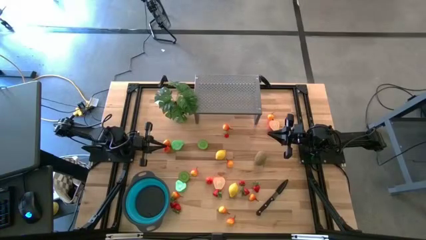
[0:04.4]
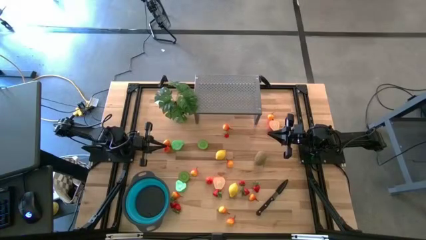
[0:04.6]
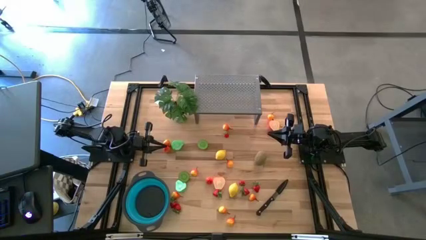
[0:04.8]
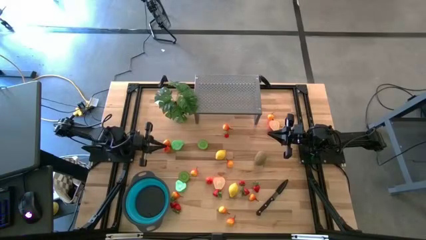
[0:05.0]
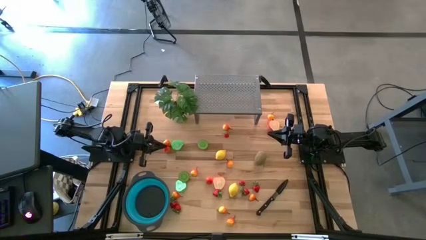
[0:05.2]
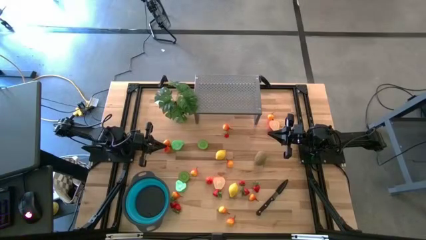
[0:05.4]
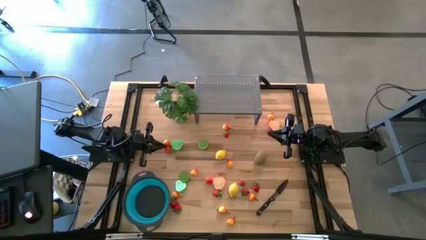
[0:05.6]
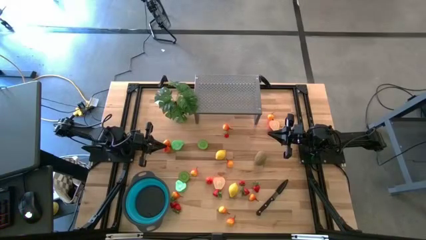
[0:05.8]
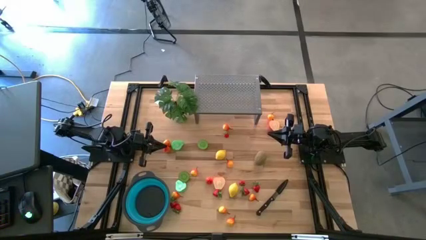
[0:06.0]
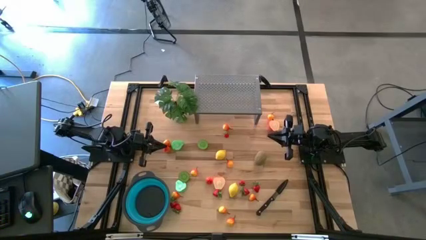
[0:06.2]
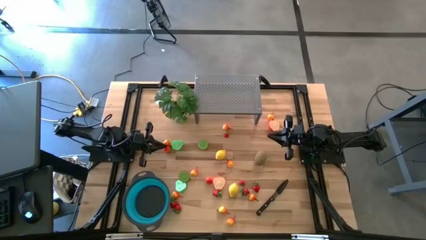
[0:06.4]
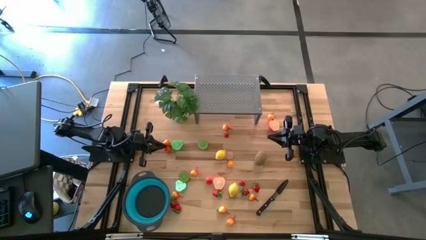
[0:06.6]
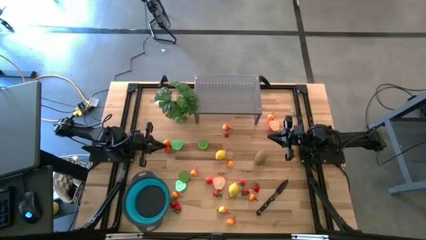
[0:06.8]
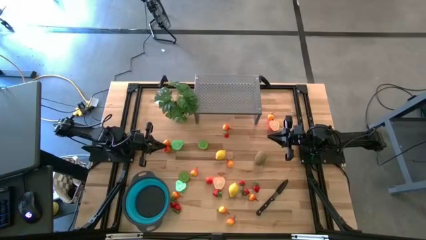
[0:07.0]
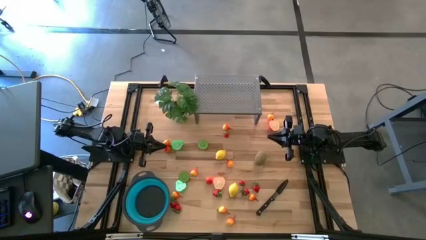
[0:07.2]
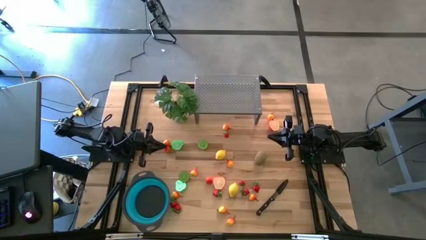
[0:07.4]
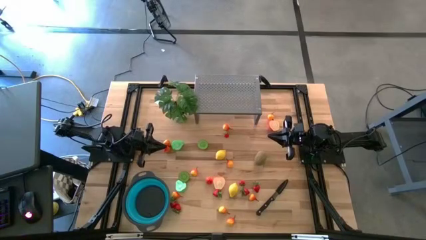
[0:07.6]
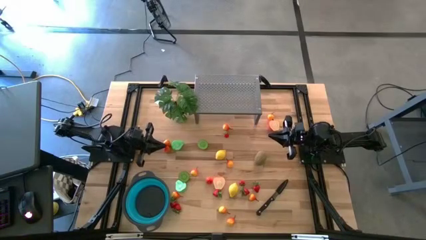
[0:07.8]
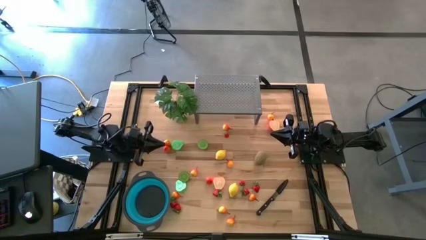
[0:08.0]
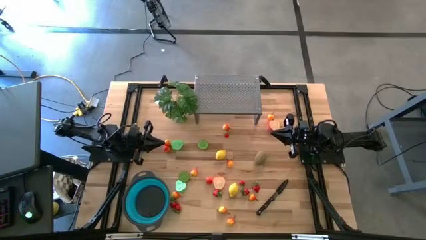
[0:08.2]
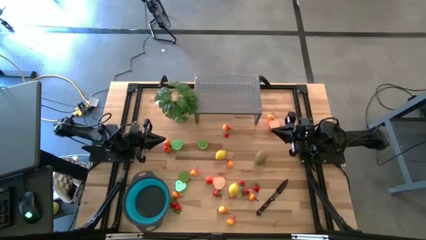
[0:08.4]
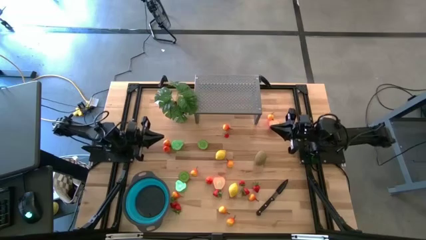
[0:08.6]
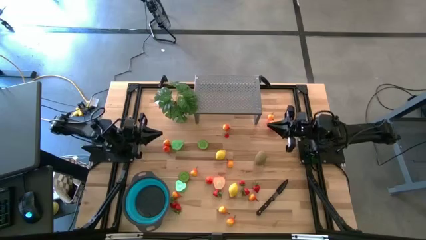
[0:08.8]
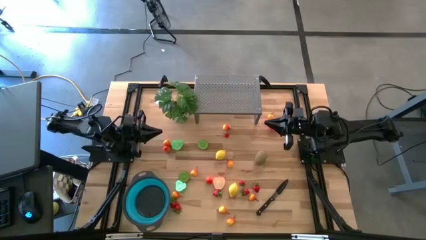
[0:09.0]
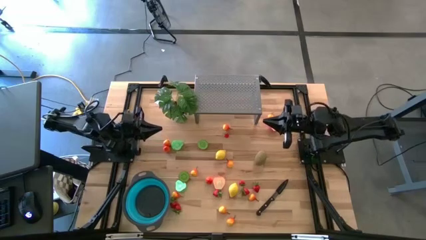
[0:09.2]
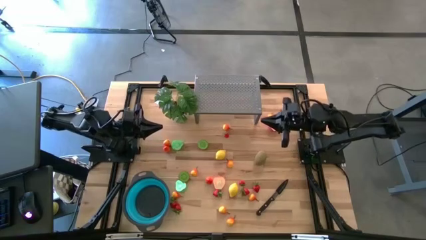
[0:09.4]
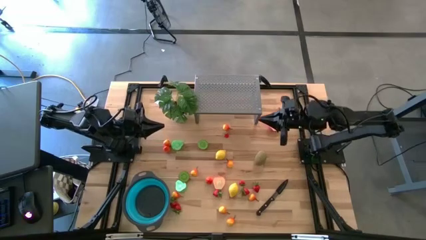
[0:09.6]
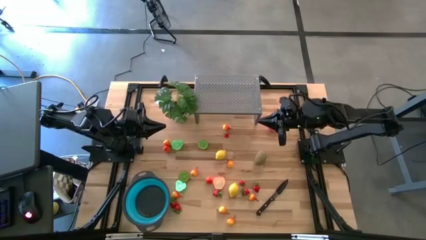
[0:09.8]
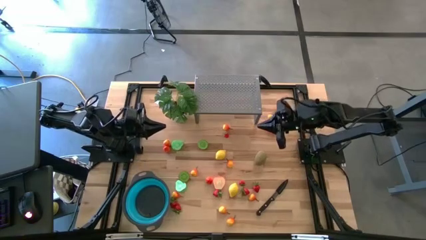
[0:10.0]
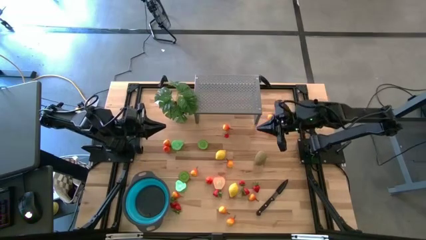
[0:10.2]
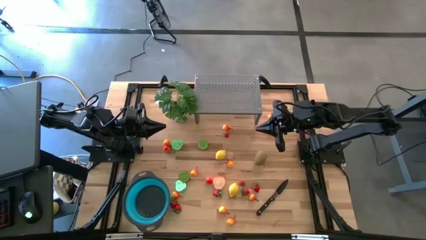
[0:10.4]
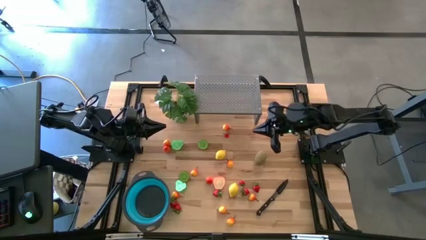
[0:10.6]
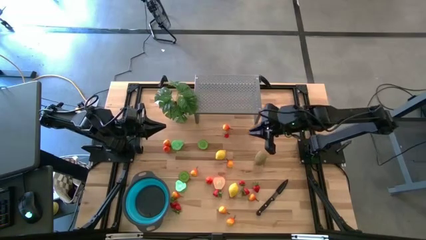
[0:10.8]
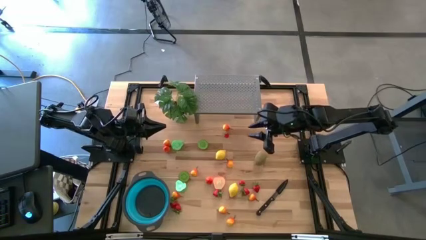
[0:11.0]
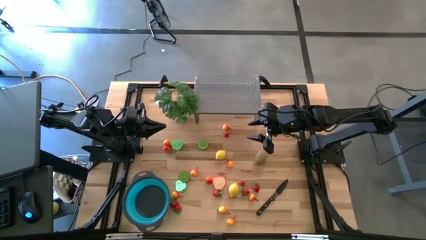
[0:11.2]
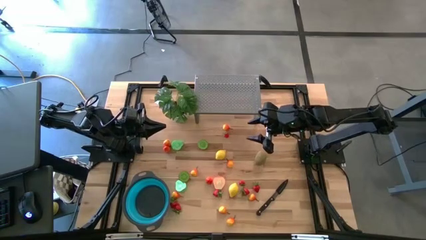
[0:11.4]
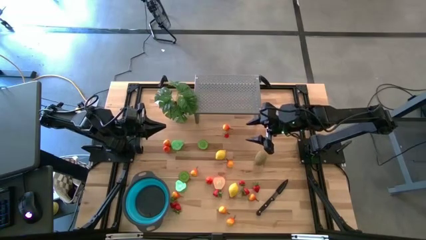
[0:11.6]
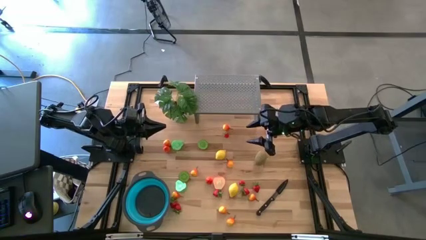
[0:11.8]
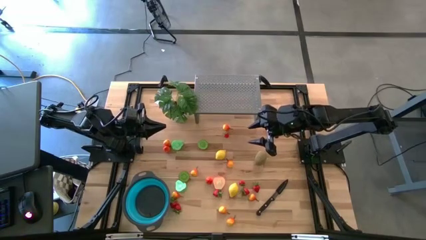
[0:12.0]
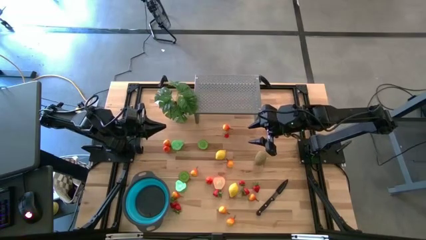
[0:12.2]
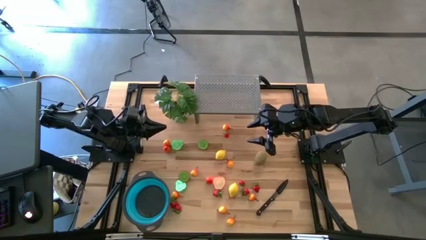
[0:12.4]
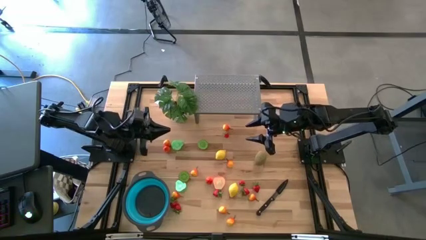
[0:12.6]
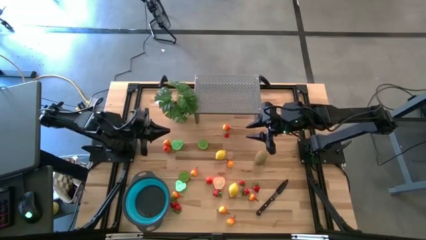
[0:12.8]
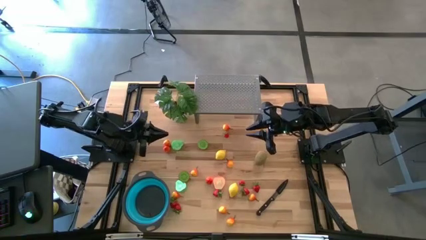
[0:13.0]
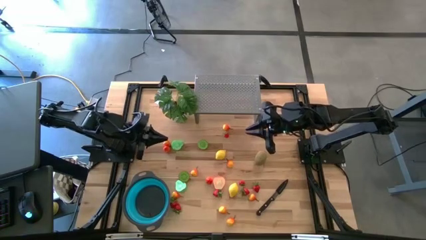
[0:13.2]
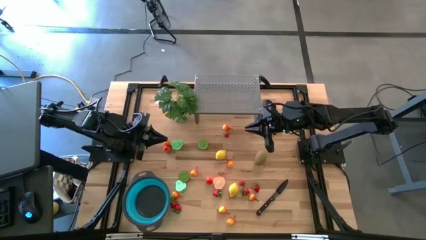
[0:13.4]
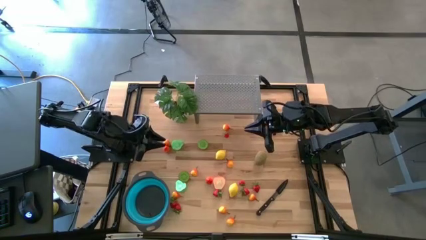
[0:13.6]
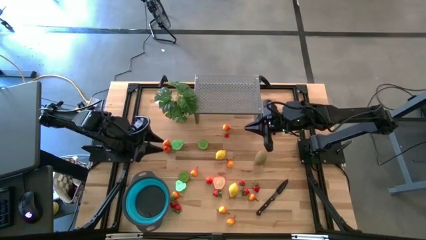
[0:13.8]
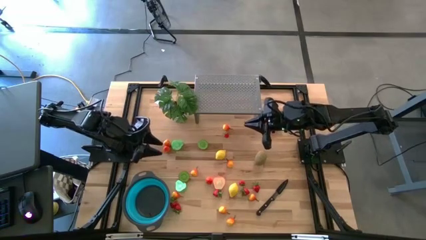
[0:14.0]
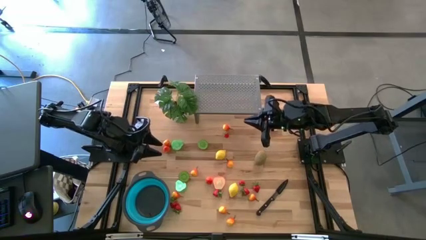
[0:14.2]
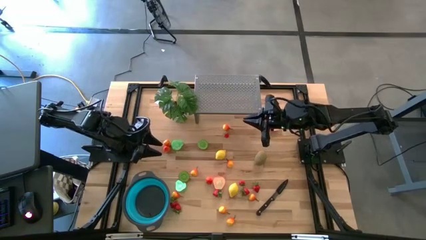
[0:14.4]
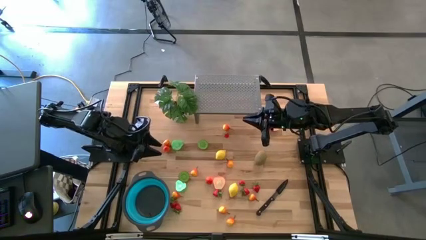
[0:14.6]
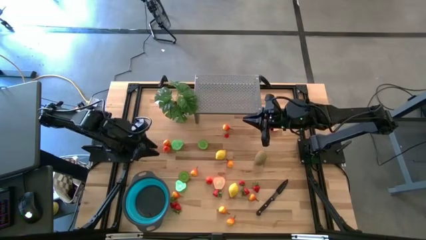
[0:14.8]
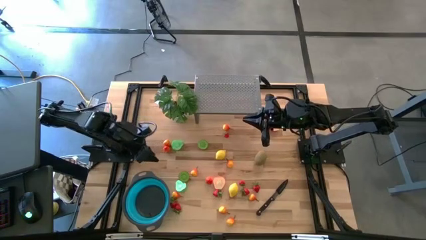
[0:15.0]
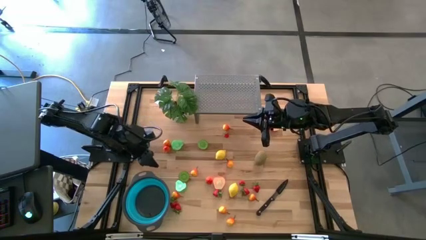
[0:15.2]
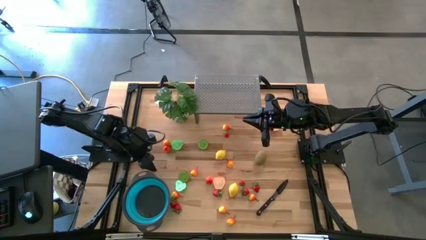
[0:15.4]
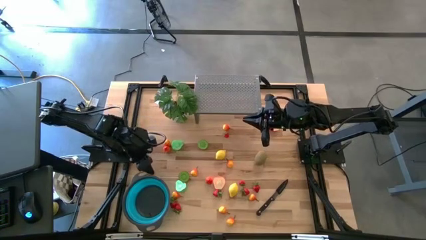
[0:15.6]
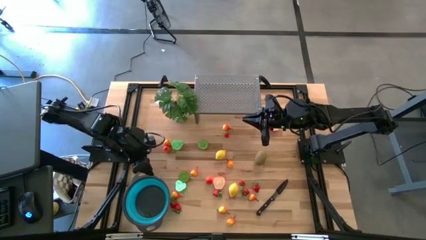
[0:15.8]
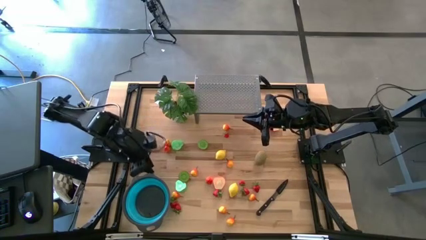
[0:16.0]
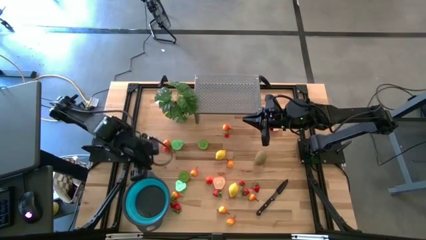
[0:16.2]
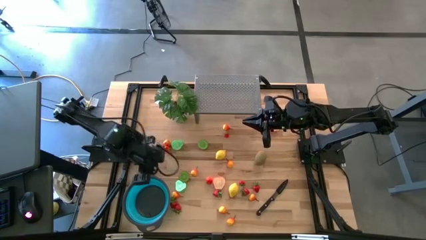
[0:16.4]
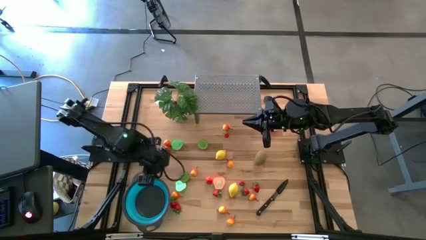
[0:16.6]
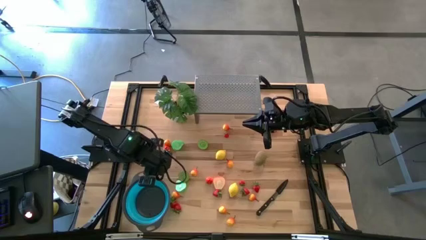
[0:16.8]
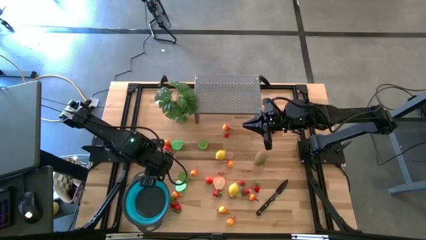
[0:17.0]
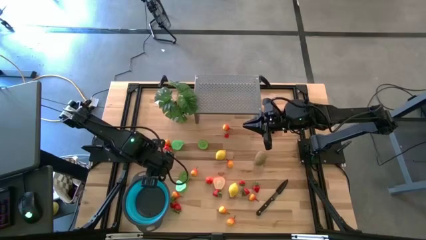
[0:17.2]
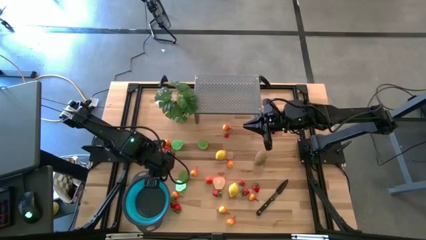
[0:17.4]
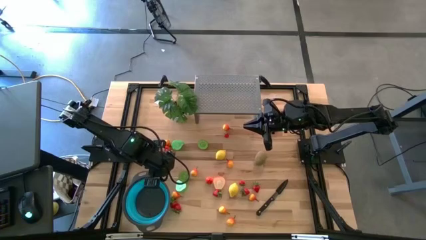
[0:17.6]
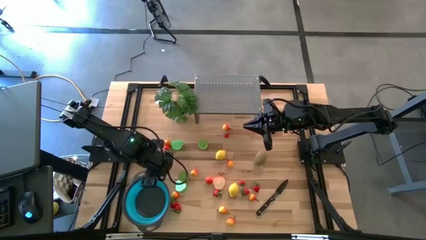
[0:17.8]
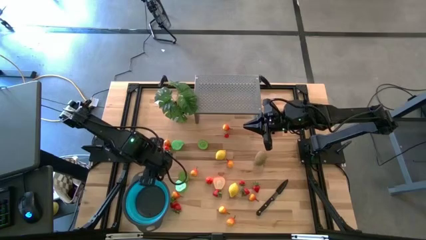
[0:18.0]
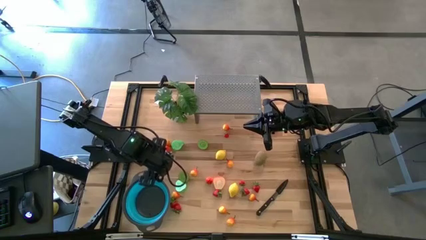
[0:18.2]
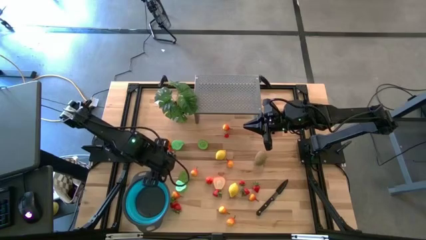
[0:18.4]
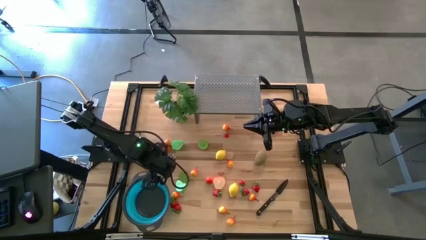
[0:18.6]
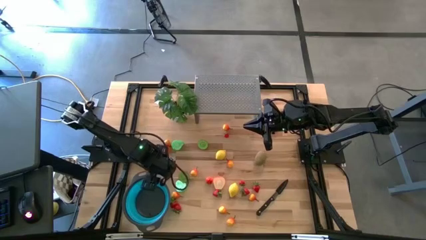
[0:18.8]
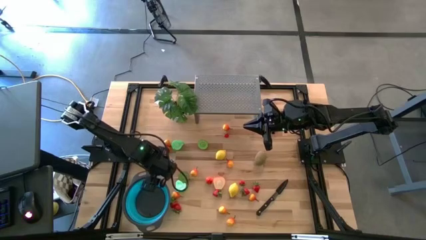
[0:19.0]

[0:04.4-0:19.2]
Task: Pick & Place Fruit
Put the blue bowl on the shelf

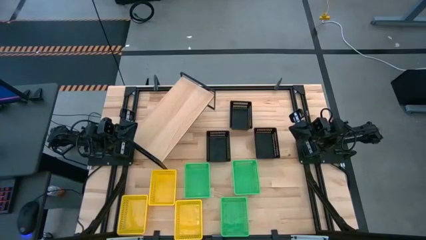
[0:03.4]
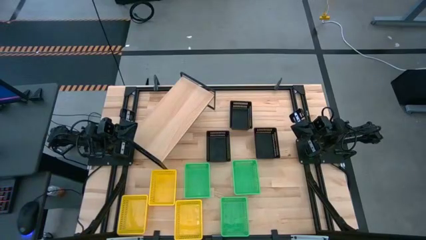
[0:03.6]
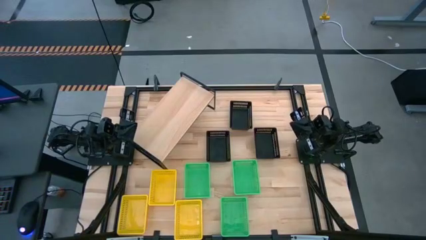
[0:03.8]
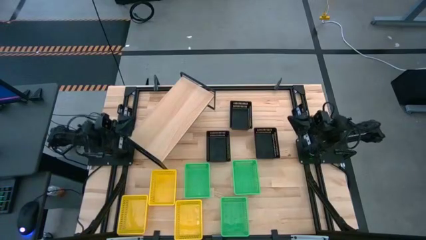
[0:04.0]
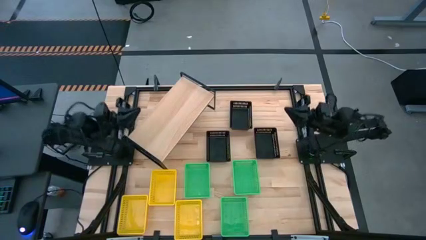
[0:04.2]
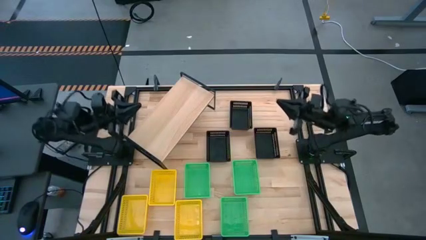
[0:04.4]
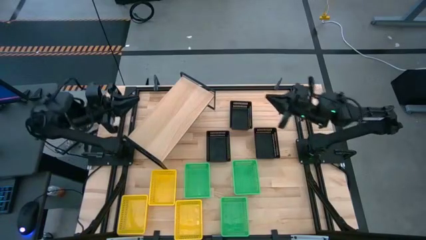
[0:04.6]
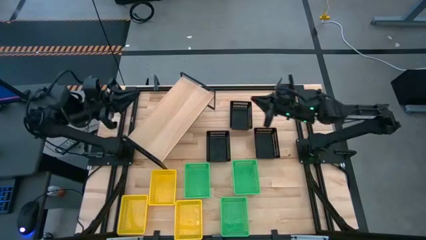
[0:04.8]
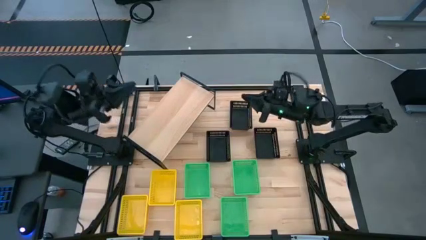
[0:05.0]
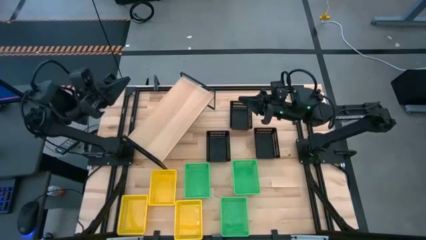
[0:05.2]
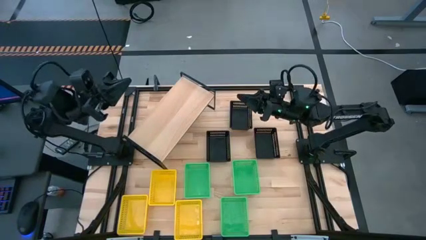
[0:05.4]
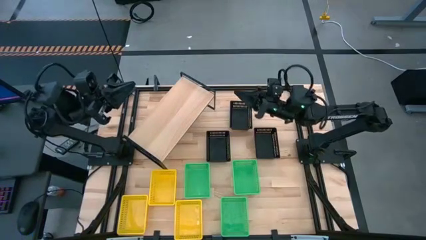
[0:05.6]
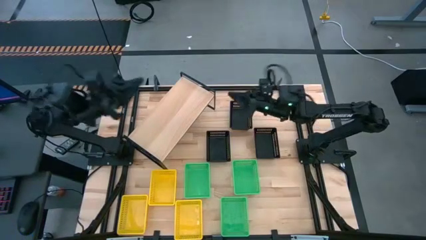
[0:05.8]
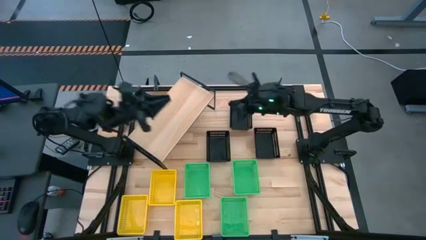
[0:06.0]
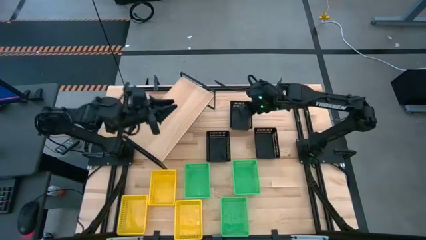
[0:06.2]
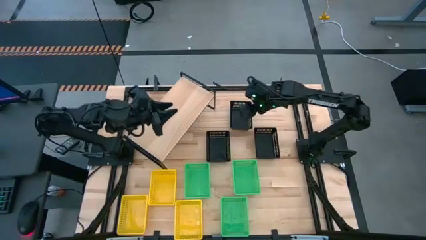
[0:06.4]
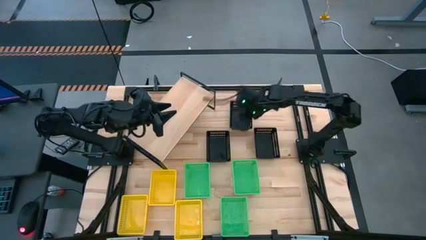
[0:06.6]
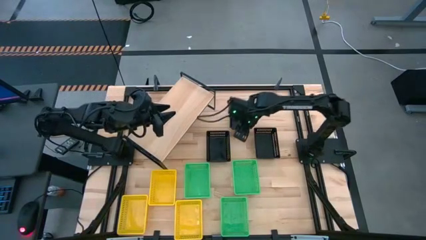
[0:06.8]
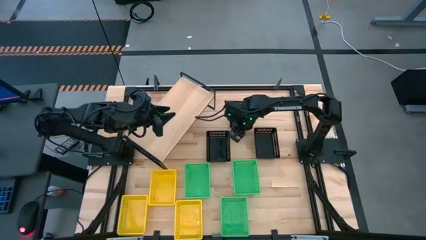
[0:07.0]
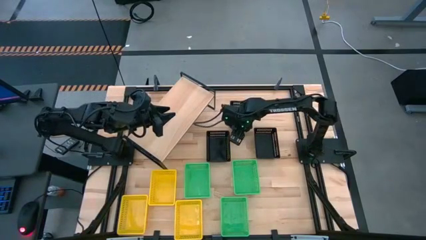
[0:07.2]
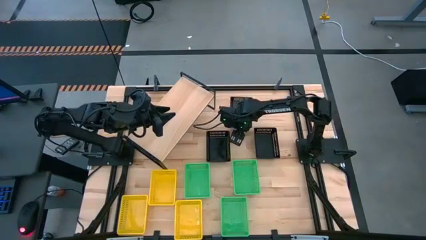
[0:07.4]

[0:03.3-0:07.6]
Task: Stack baskets on shelf by color
Put the top black bin on the shelf
